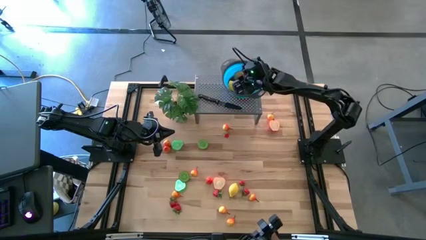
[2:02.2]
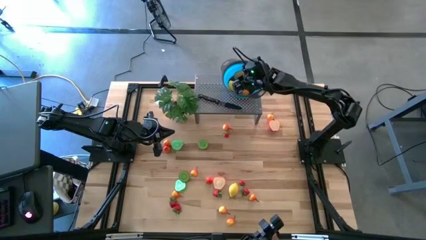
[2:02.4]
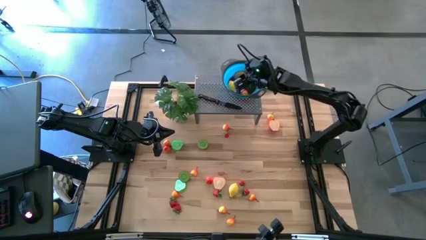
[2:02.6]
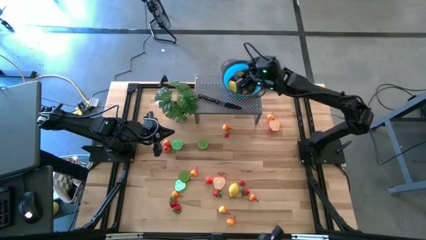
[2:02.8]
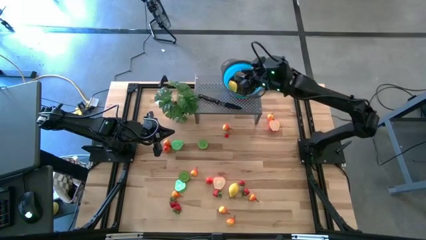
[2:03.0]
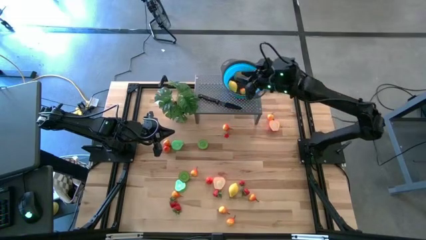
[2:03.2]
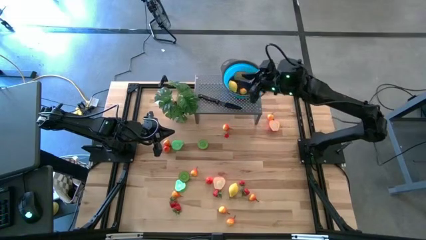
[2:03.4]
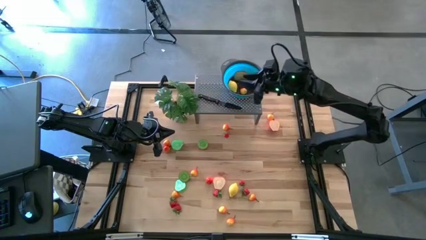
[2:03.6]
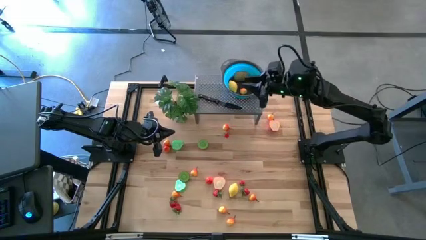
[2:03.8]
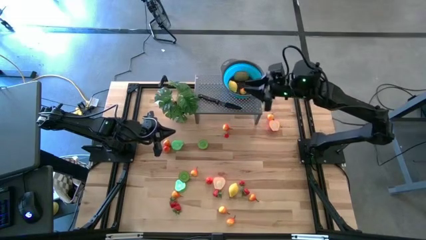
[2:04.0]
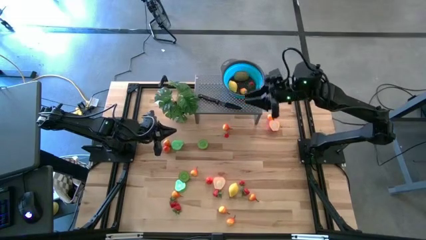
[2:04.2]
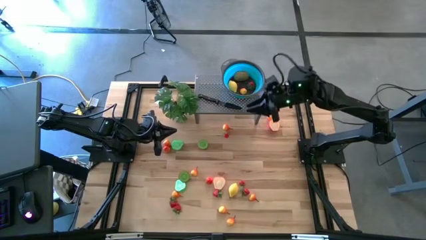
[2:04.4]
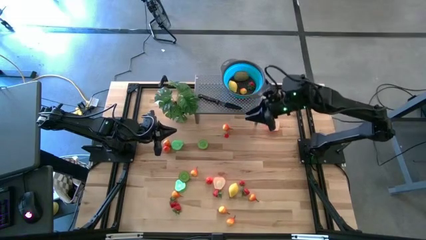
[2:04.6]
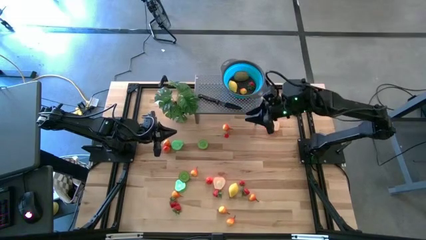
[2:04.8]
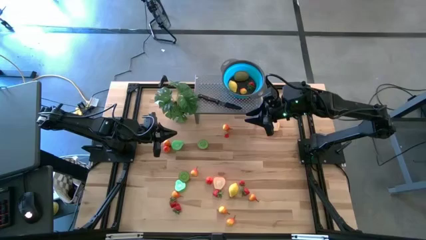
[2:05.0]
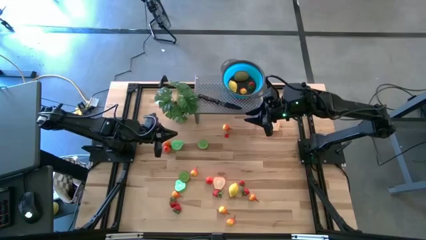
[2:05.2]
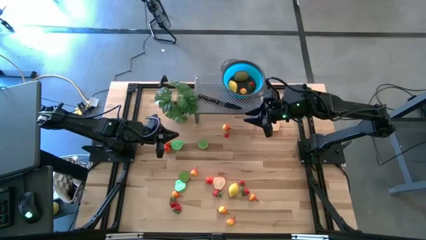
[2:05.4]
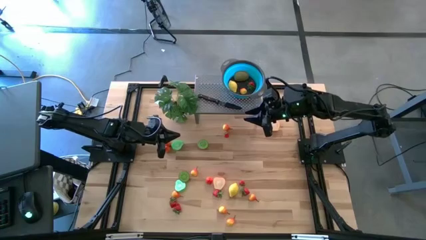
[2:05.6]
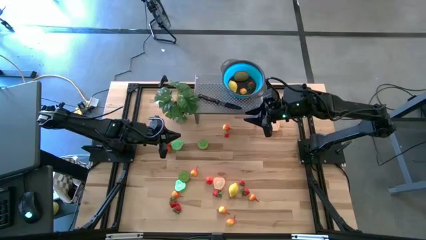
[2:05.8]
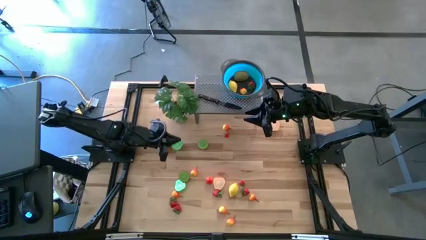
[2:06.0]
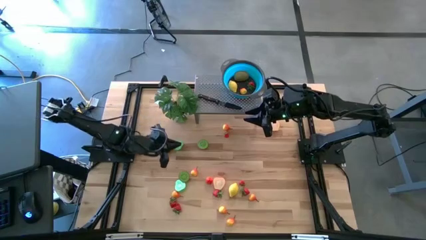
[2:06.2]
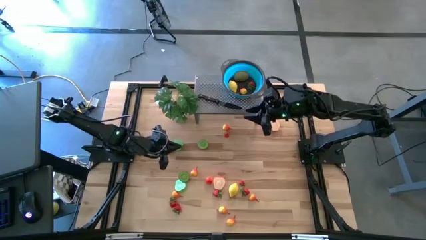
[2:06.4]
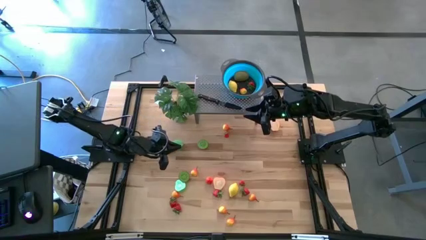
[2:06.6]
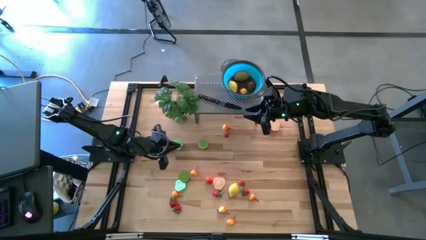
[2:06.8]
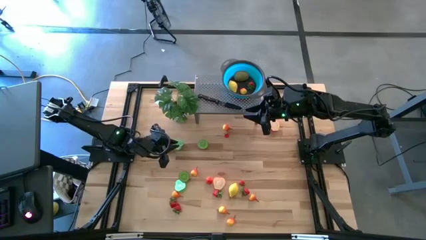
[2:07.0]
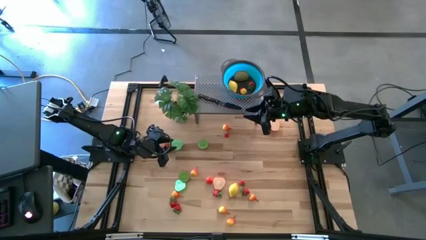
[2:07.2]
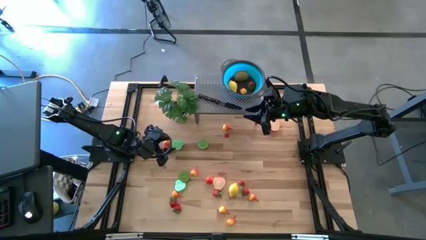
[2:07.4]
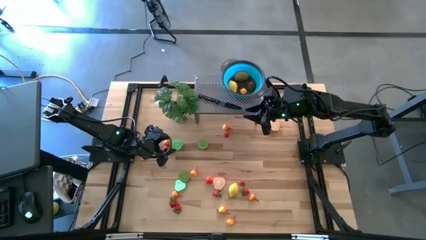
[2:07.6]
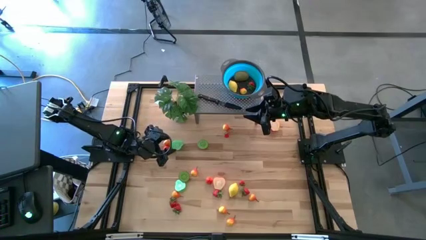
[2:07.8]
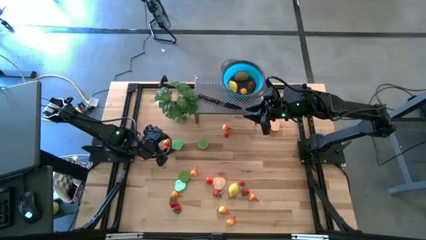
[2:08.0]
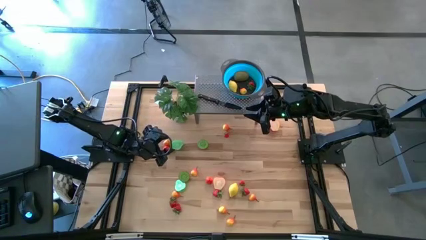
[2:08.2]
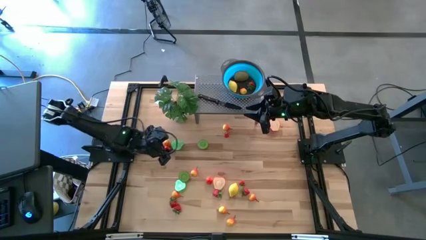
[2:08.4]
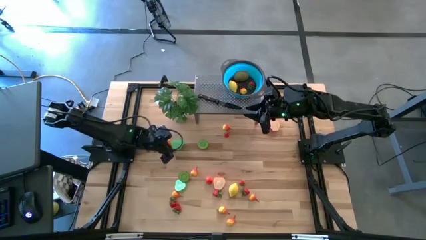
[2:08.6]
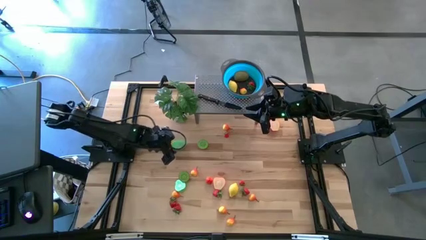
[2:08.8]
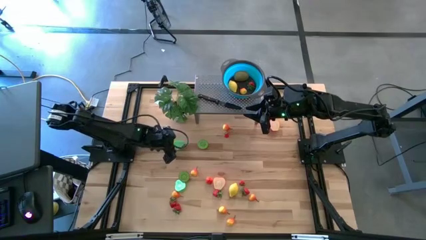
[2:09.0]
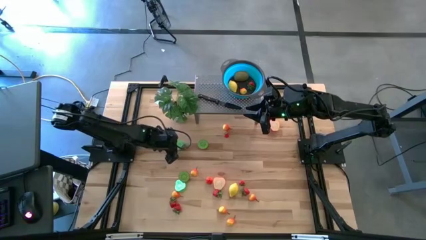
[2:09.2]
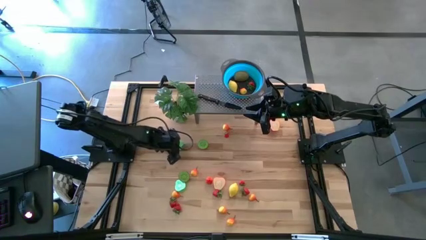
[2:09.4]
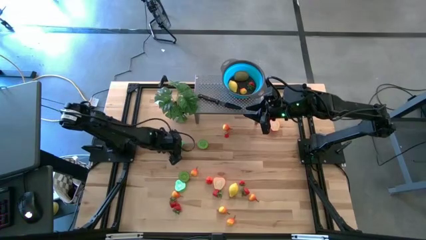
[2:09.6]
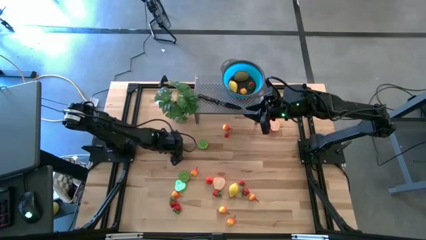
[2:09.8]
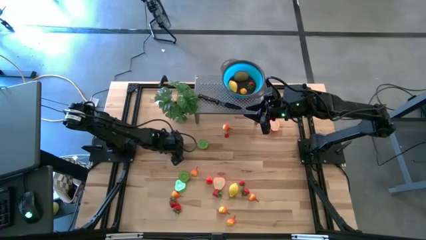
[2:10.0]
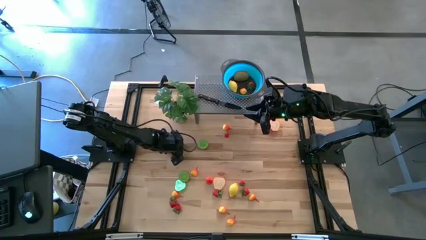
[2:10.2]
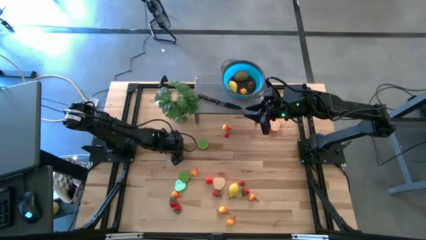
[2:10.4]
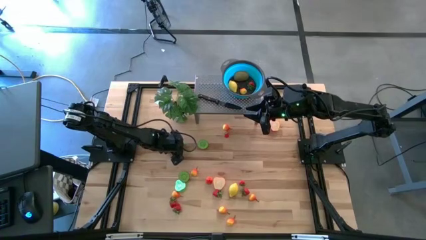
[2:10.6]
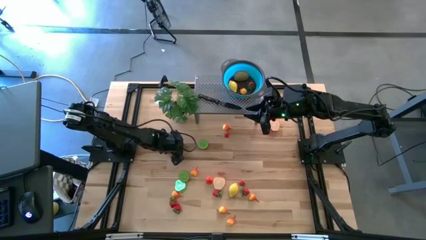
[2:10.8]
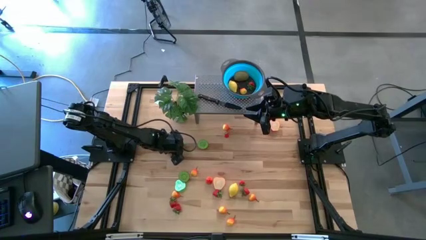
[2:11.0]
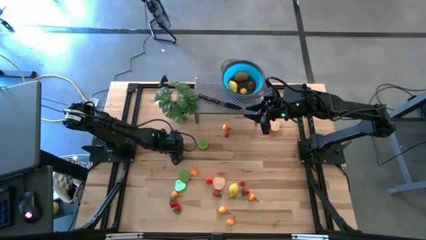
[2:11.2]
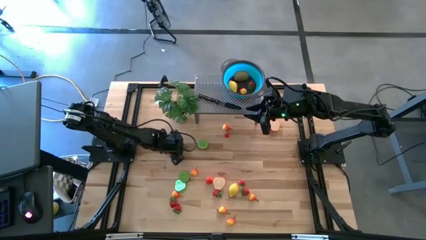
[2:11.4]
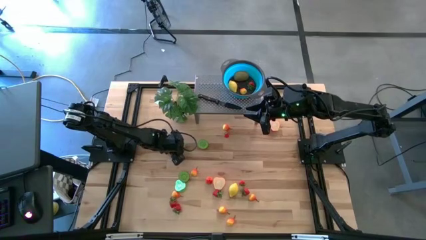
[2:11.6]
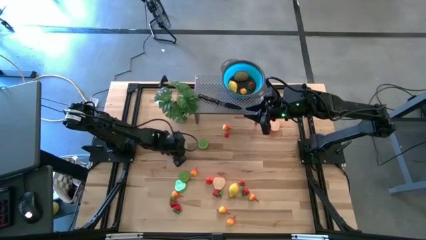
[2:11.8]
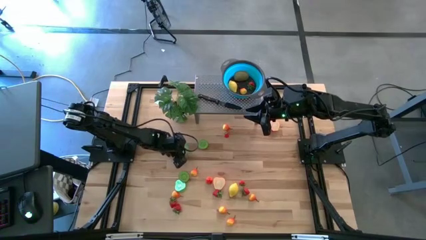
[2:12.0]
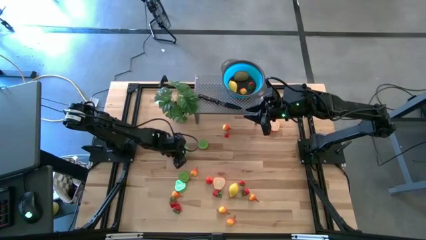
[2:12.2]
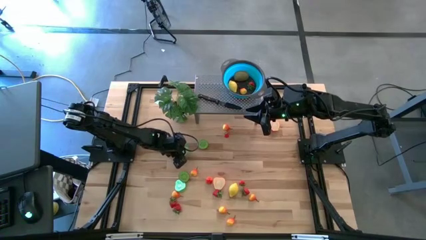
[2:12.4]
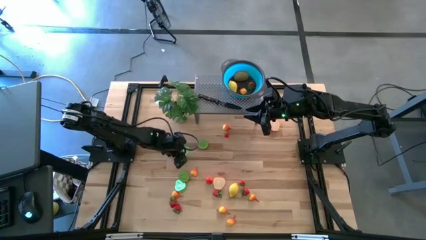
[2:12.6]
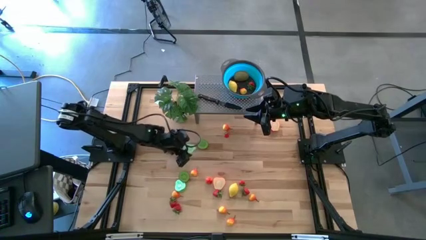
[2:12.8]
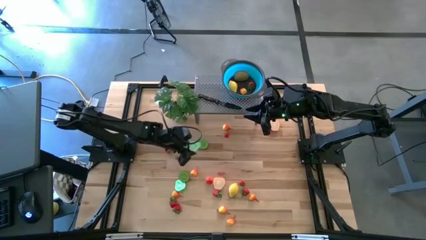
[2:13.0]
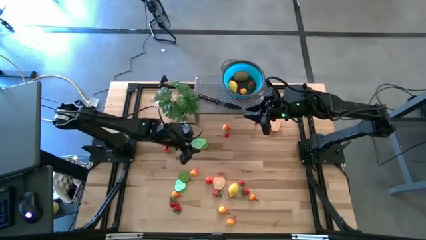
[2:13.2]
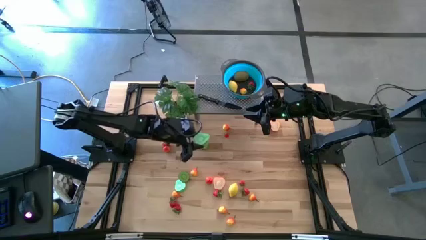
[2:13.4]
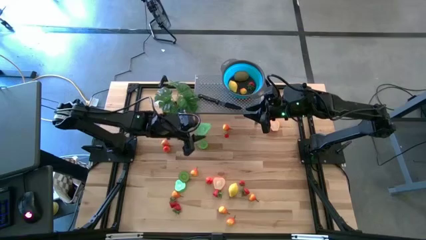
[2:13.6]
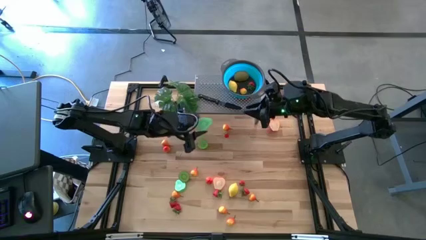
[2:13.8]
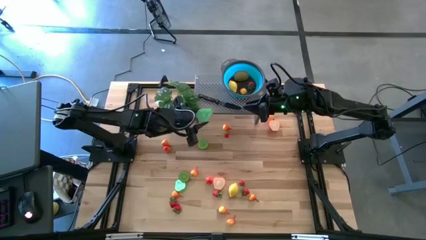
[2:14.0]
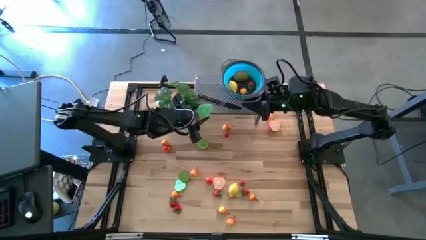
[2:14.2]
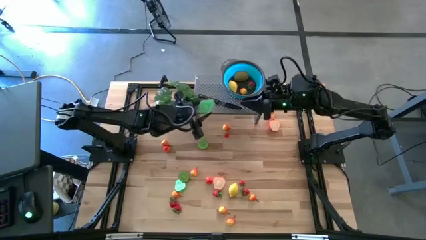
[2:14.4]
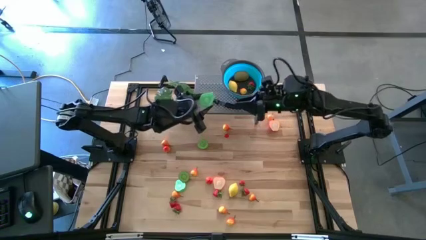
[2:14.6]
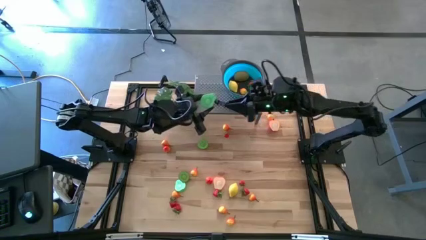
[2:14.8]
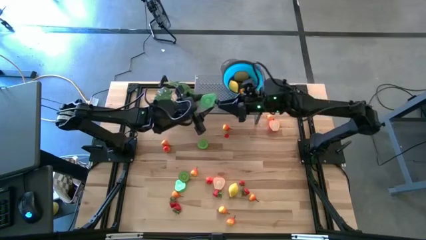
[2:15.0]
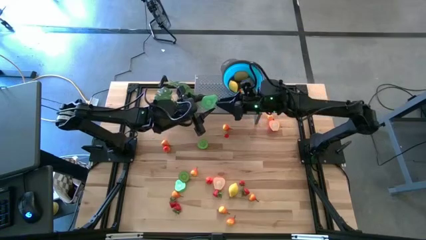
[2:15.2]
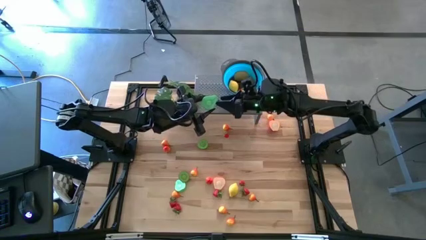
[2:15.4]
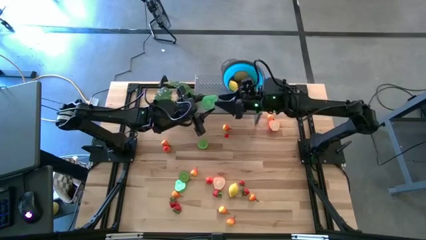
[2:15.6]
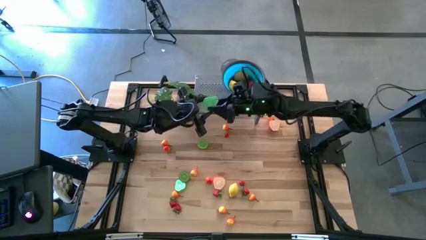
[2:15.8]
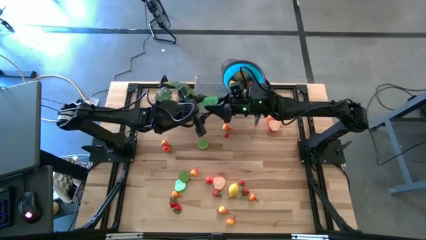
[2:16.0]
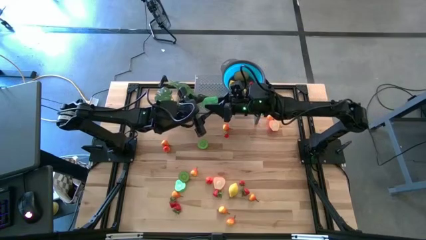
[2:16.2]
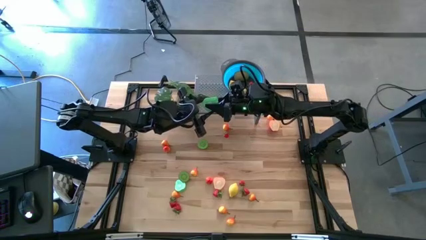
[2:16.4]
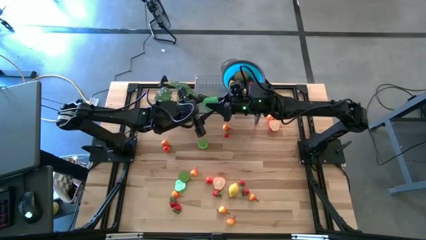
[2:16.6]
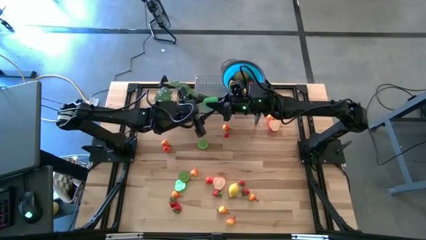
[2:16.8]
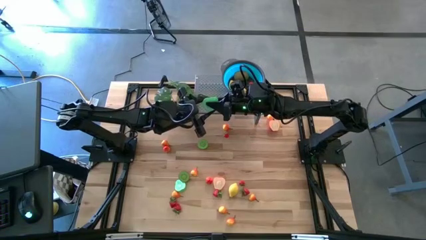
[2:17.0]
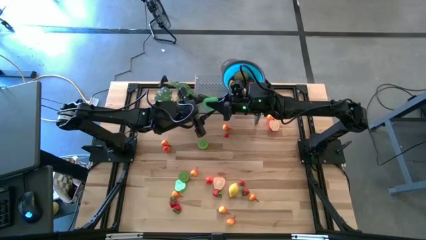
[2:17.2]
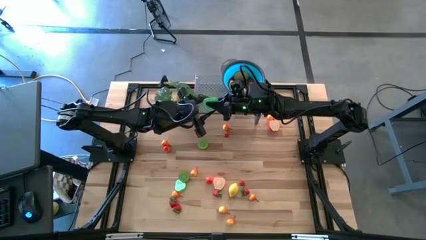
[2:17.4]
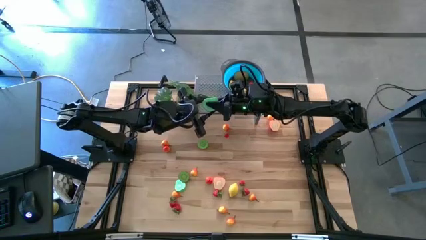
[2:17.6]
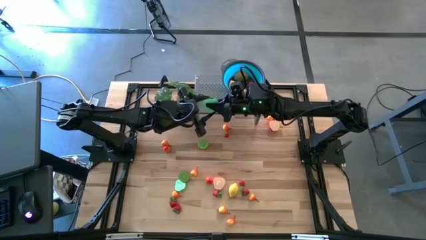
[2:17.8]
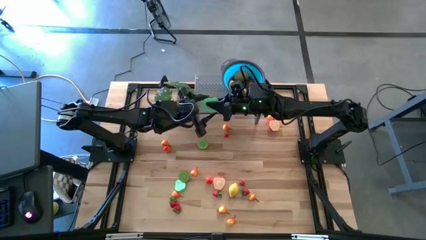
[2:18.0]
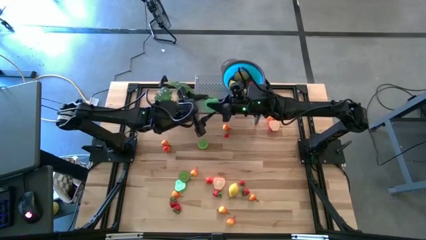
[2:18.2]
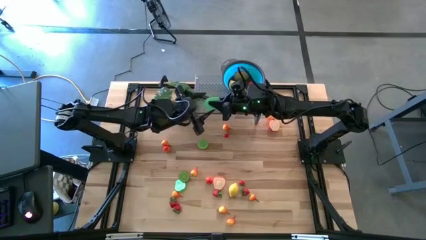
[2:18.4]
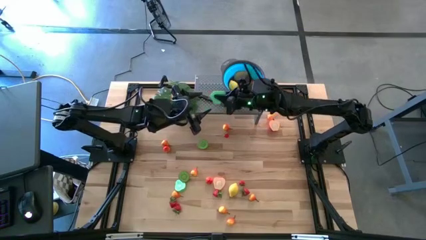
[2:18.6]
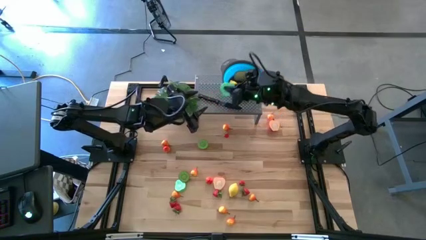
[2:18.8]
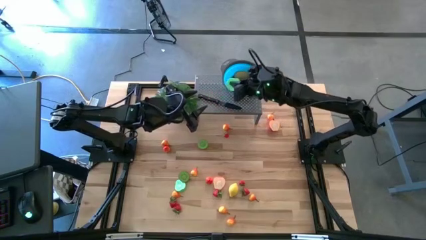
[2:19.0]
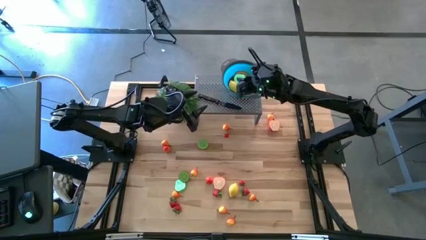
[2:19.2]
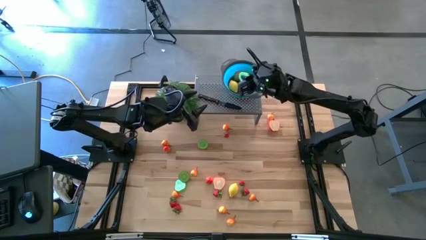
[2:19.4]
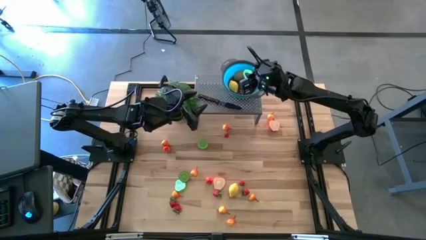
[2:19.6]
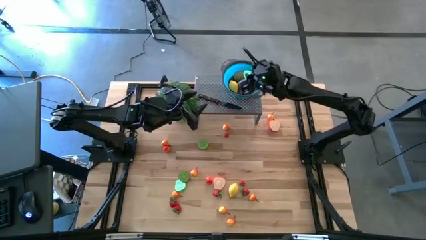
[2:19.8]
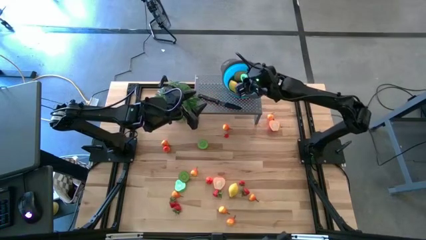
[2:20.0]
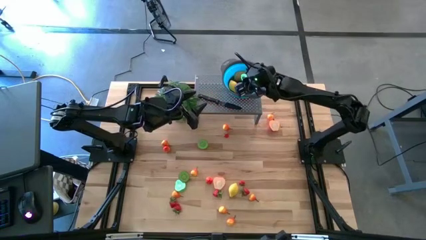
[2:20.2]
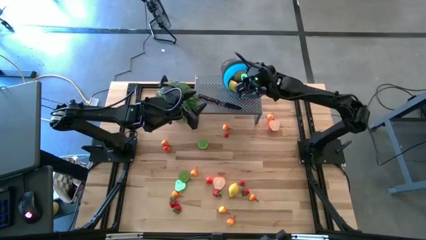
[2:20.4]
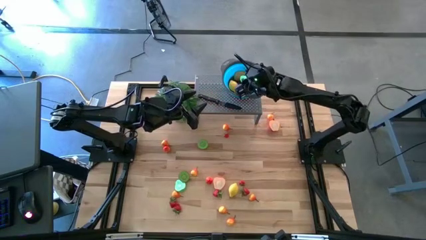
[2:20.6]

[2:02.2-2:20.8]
Task: Pick & Place Fruit
Put the green avocado in the blue bowl on the shelf
